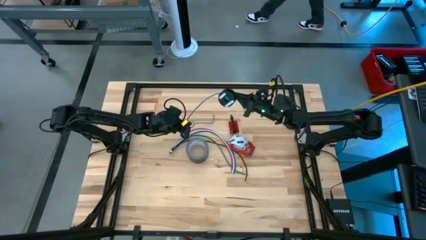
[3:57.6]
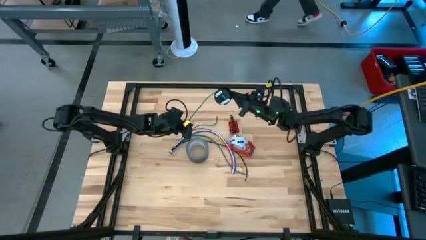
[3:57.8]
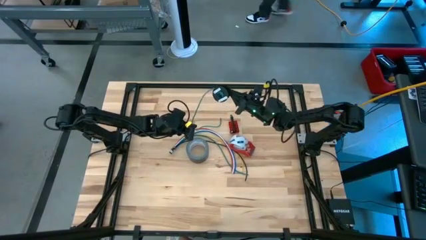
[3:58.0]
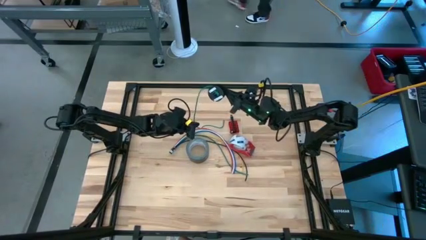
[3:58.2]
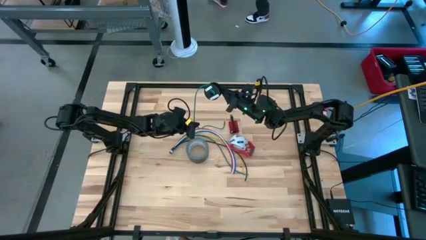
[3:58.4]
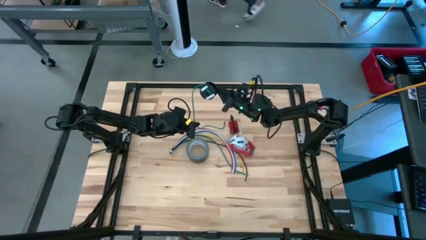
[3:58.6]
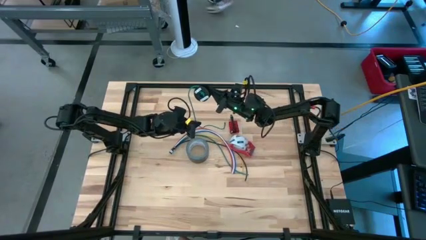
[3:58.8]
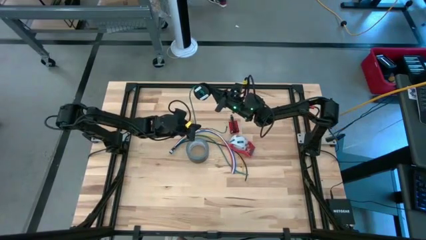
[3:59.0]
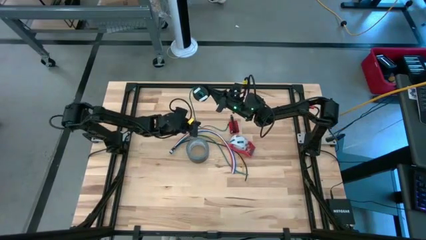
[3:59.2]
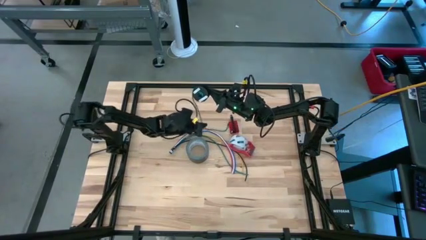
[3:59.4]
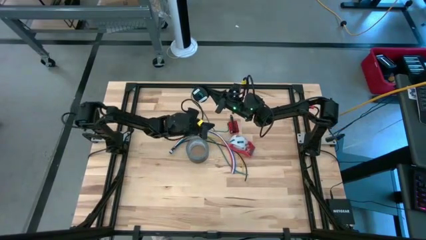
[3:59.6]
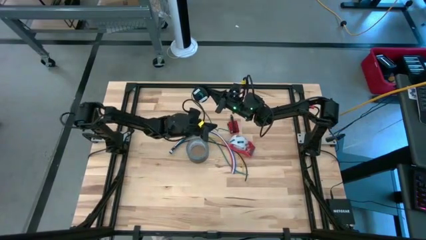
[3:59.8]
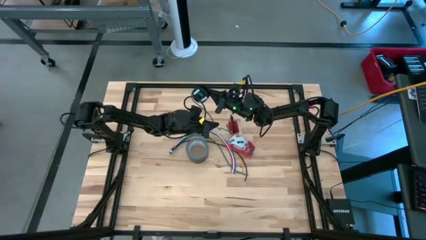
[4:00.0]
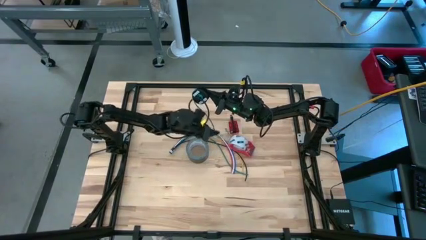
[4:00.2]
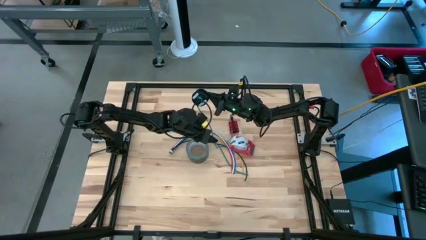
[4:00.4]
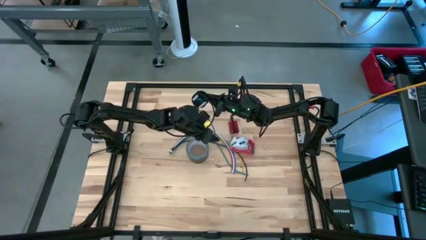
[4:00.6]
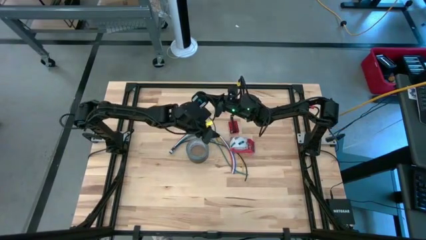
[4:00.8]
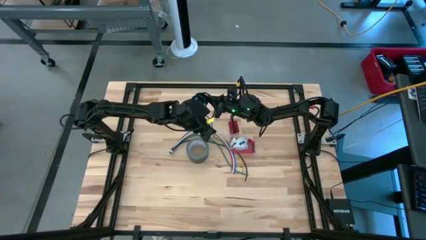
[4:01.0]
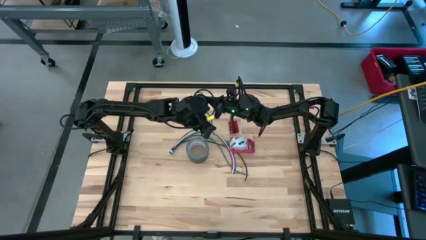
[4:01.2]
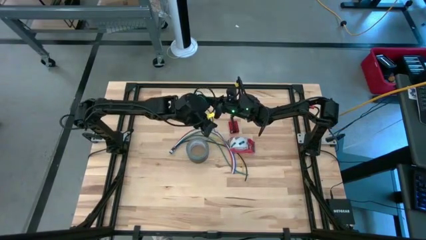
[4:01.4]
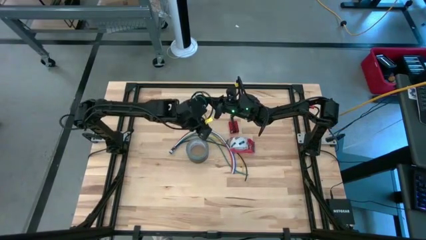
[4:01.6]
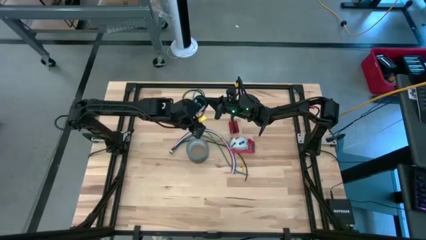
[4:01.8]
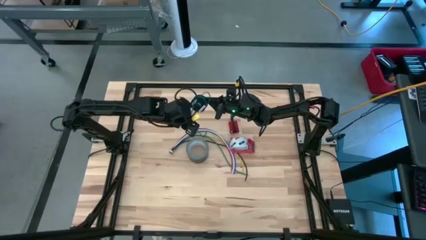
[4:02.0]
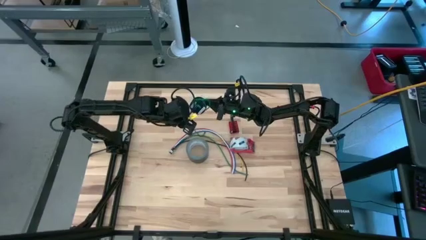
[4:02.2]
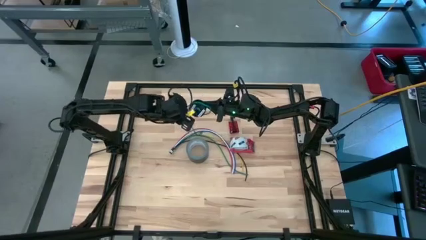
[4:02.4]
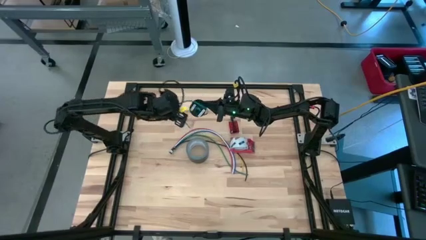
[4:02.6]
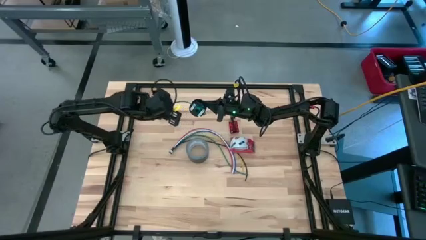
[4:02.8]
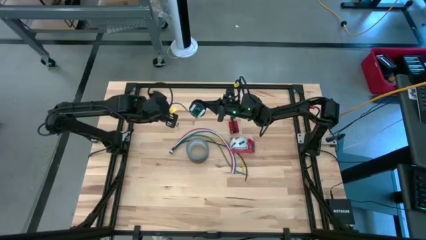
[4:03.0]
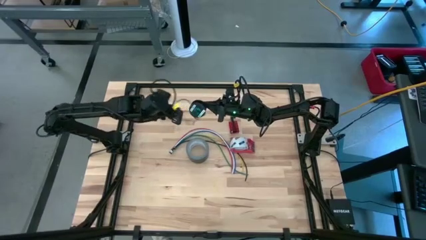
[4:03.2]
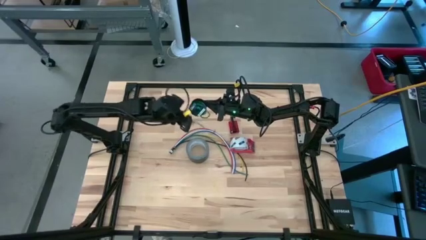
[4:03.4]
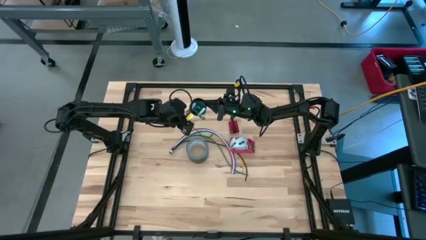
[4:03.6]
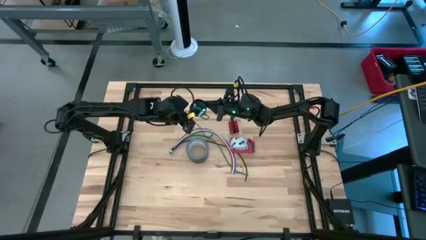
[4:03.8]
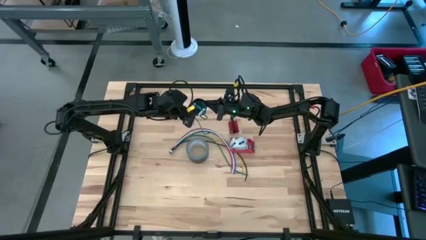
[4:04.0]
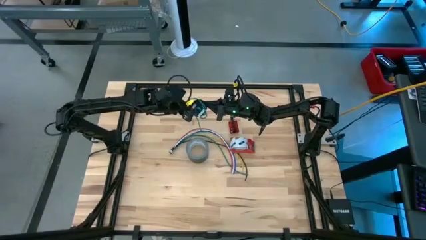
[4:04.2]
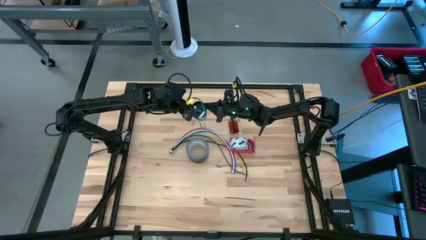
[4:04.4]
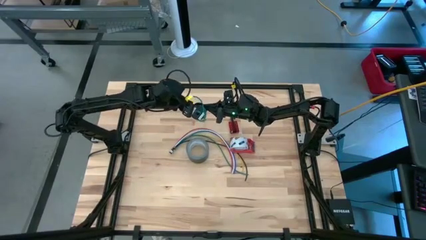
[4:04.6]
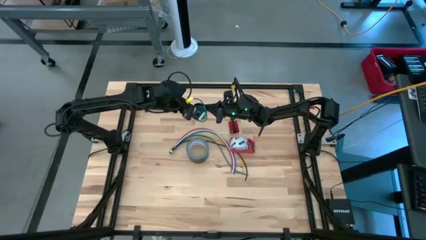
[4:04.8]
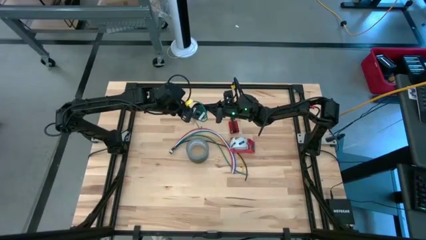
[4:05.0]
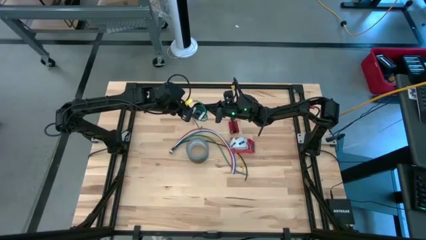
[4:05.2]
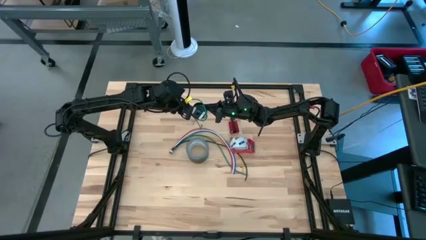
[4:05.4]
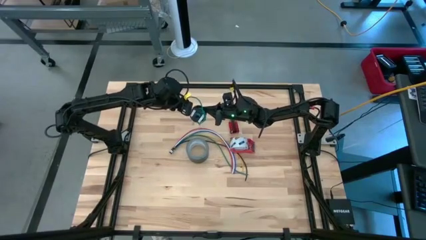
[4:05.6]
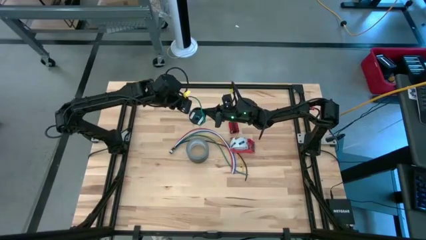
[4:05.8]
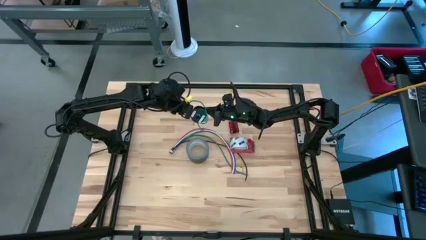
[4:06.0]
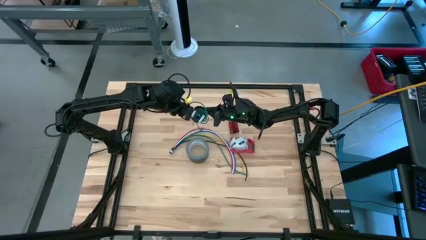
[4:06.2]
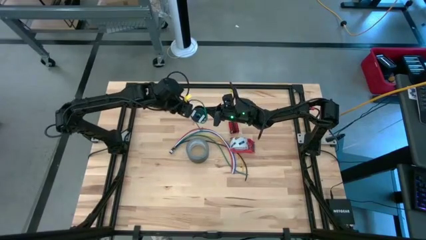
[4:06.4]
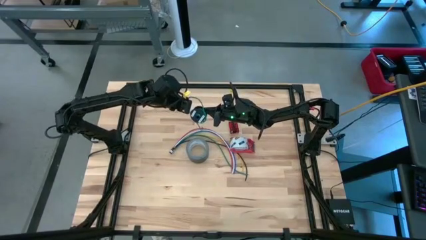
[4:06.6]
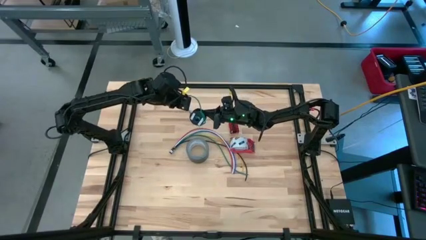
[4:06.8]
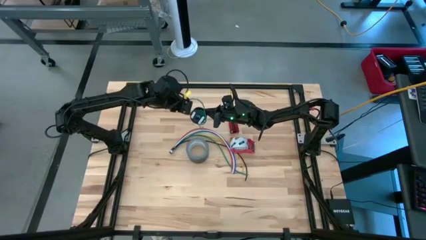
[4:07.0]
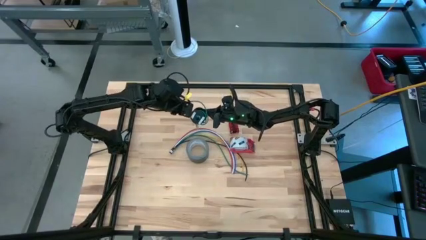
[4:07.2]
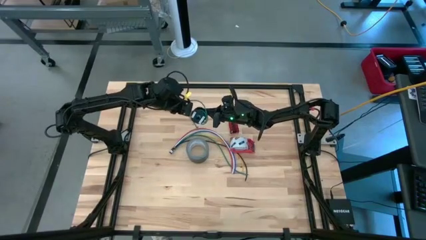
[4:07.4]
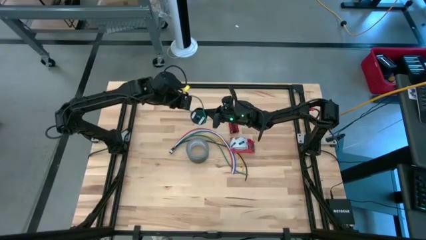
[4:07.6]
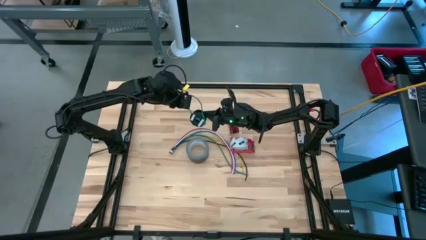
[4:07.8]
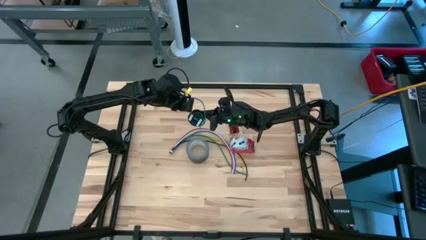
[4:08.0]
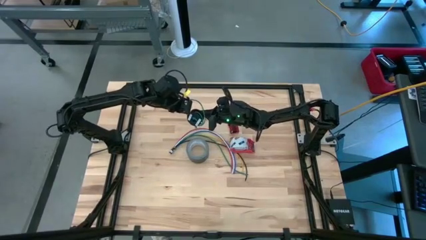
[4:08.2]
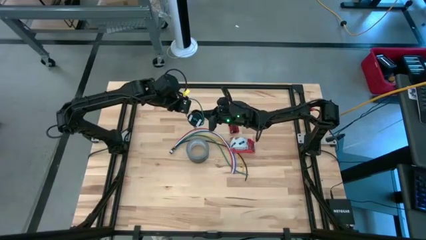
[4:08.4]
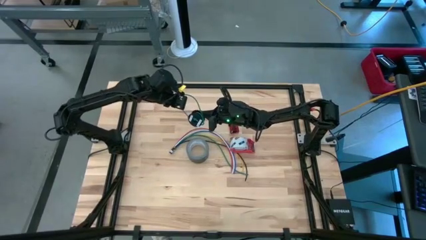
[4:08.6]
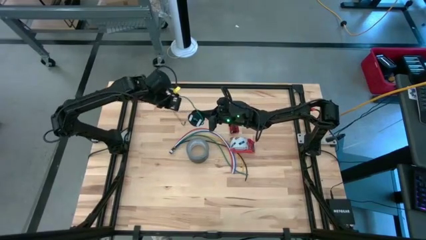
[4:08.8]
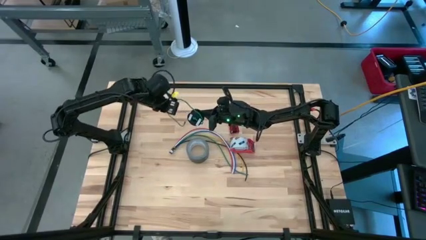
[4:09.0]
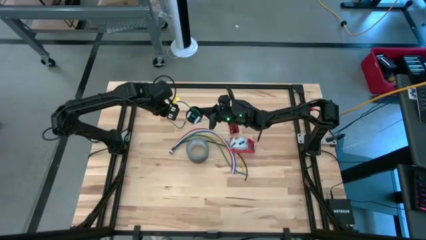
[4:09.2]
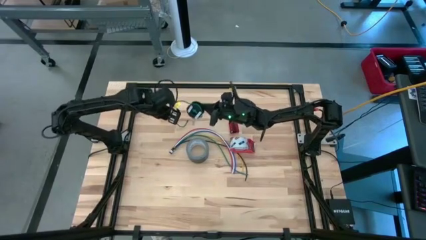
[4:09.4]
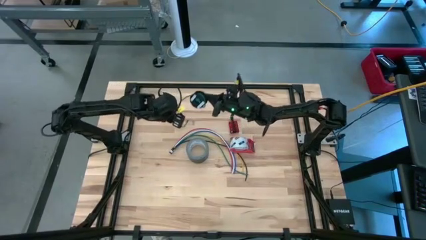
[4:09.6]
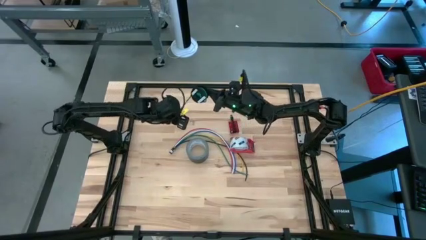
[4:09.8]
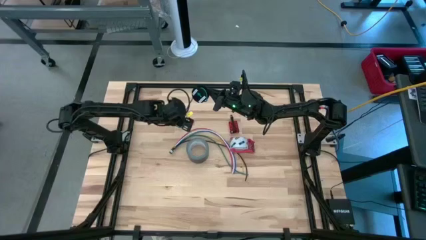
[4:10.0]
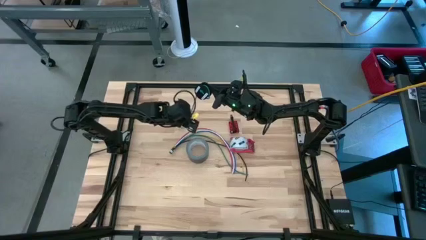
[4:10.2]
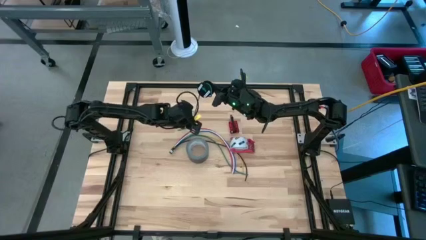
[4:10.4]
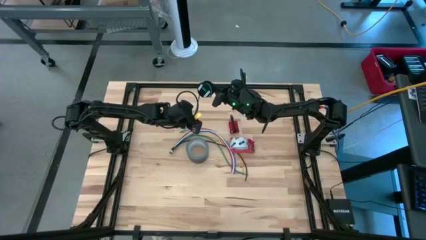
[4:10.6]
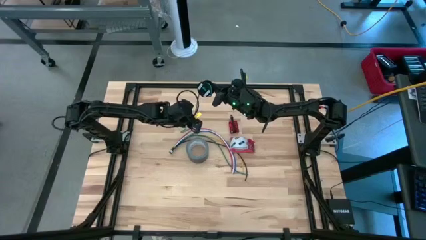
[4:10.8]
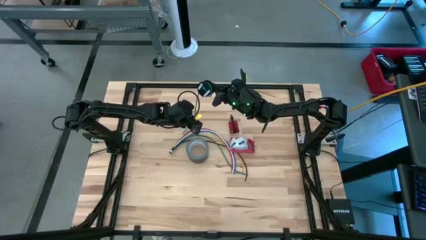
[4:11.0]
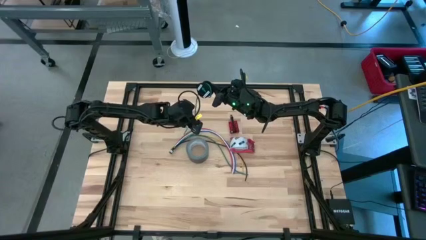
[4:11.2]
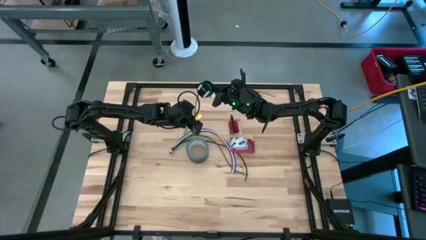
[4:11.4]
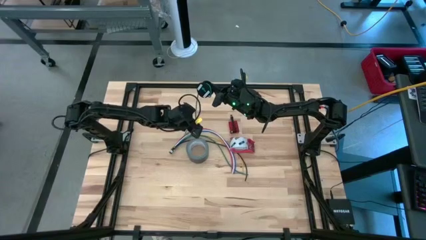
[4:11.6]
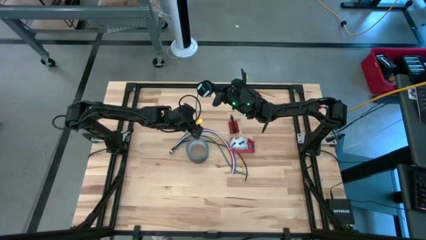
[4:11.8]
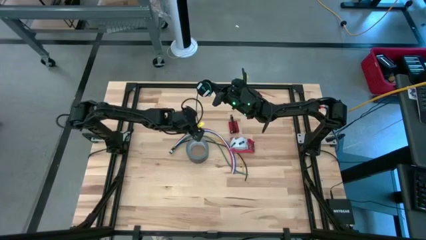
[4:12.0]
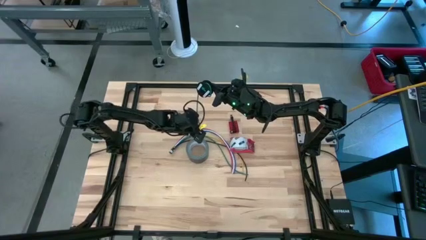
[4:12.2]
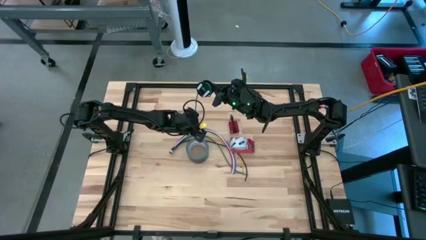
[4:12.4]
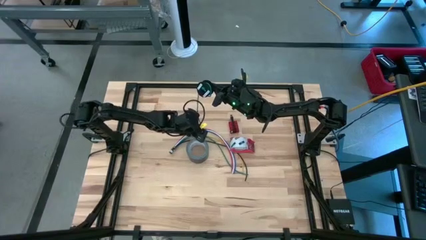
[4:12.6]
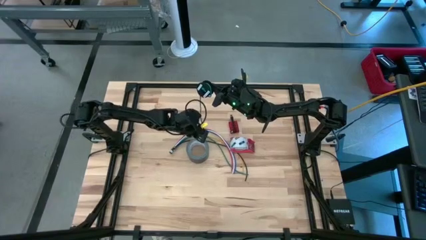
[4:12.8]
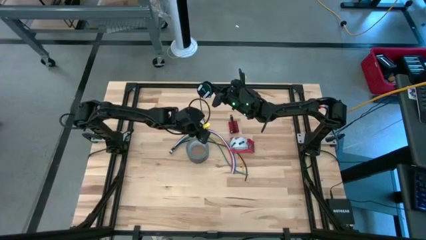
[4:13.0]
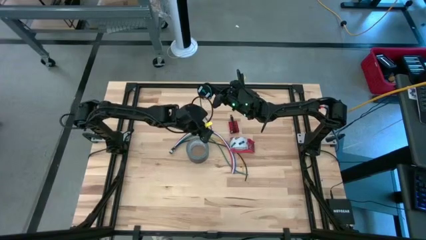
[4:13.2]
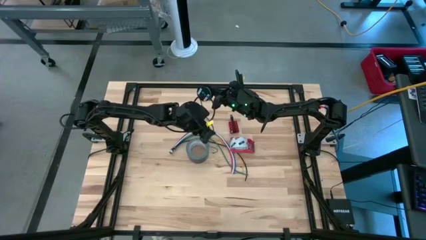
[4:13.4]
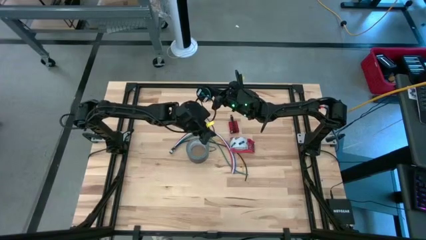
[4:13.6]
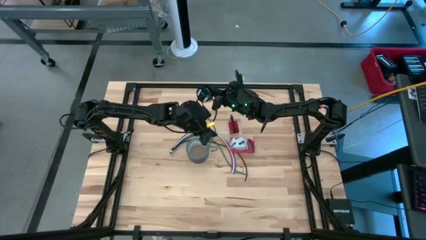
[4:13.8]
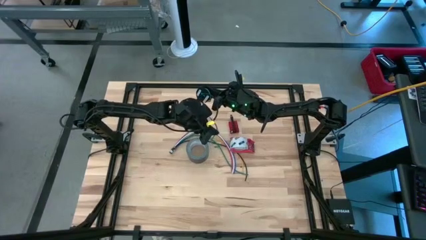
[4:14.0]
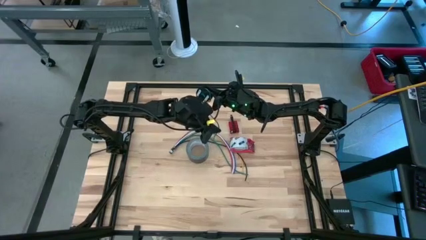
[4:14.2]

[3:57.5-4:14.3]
Task: Coil cords
Coil the green wire onto the black spool
